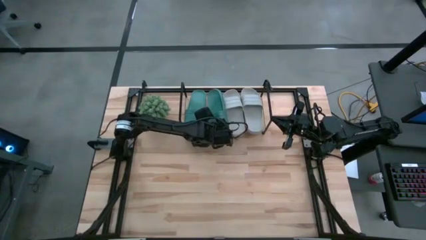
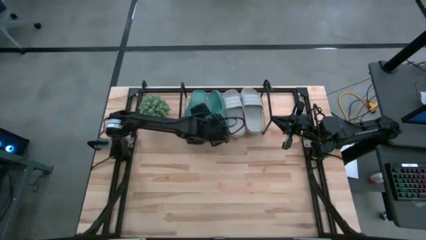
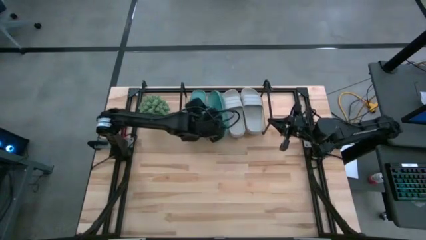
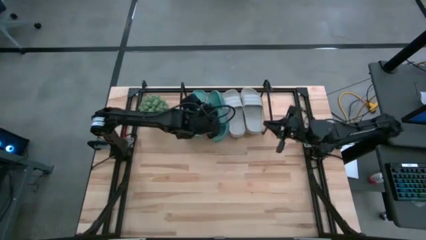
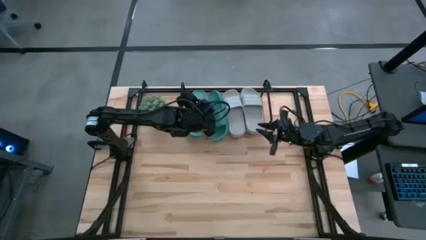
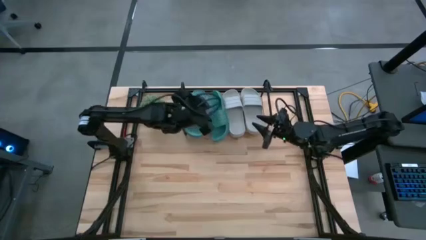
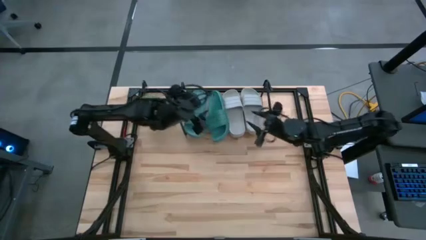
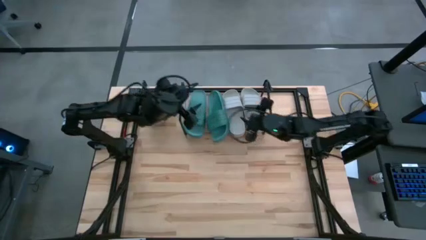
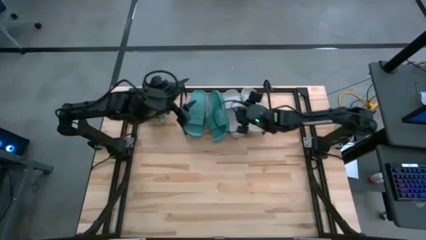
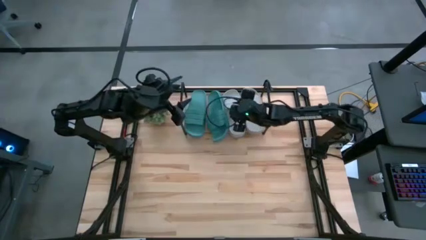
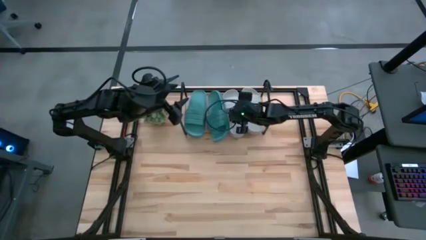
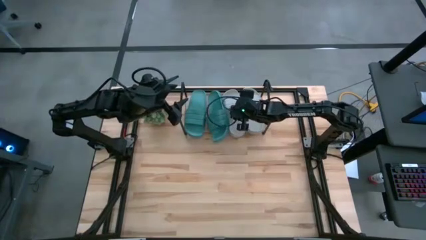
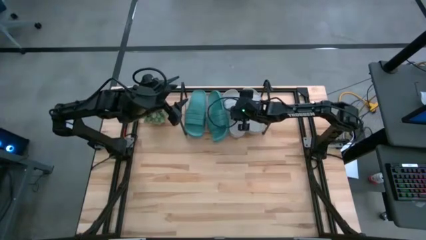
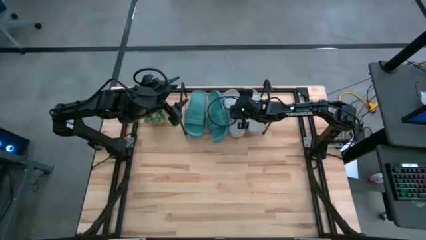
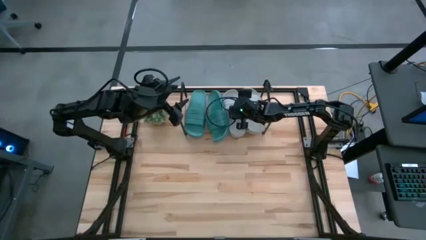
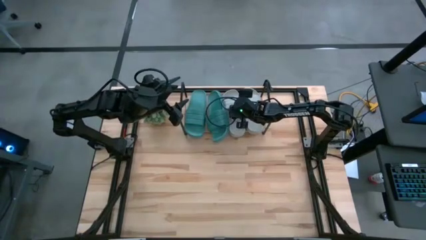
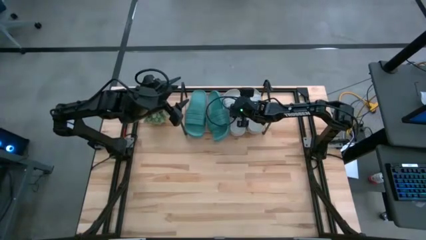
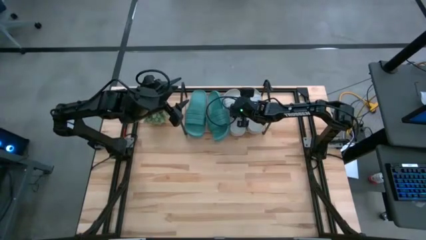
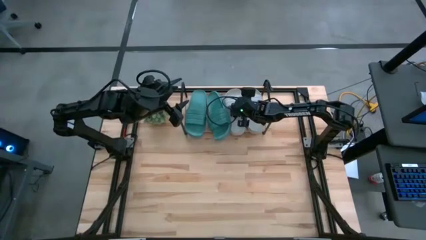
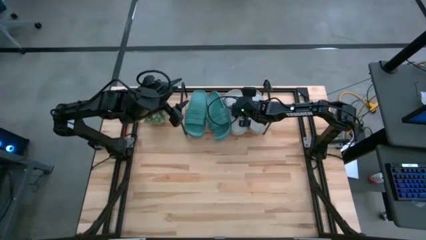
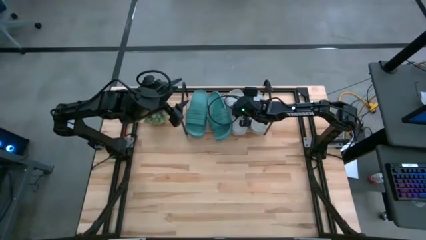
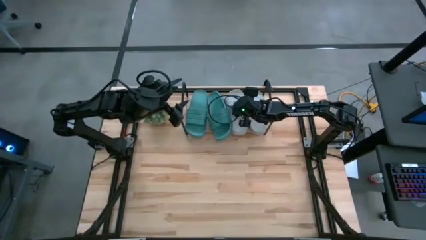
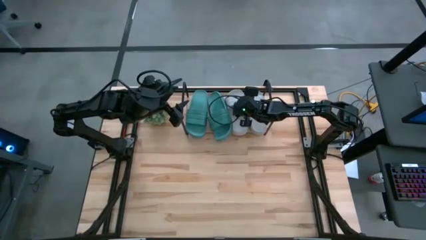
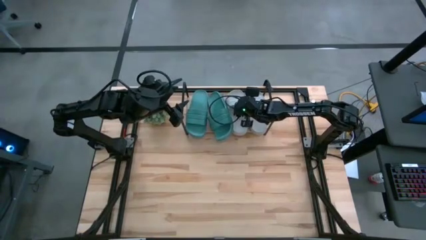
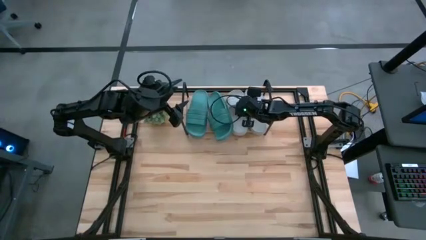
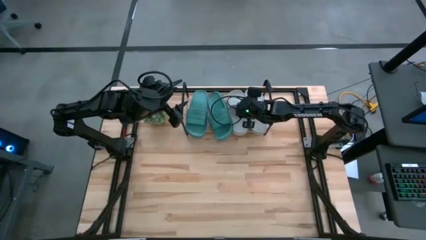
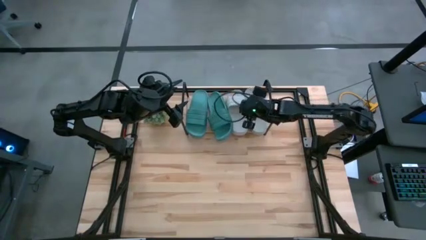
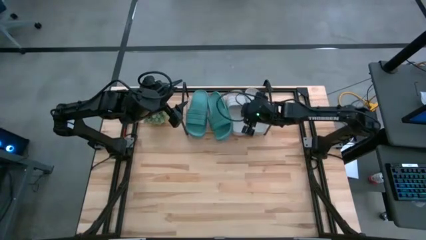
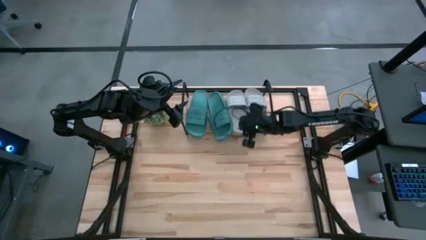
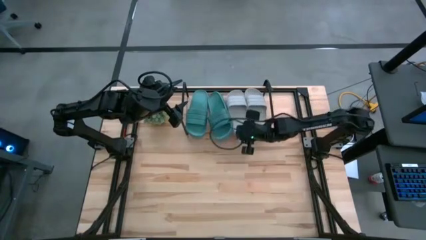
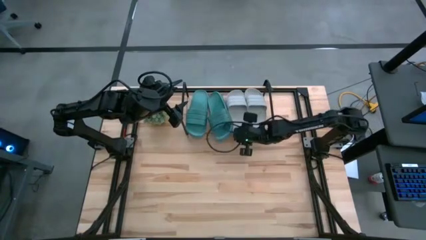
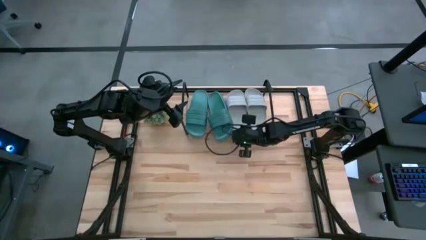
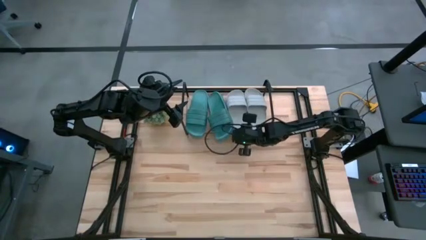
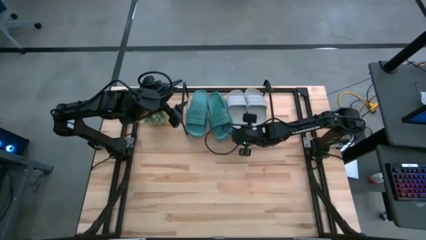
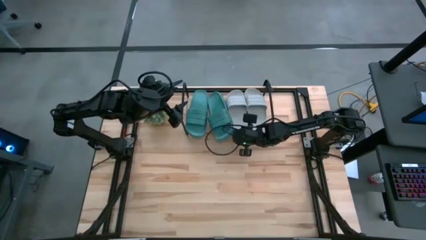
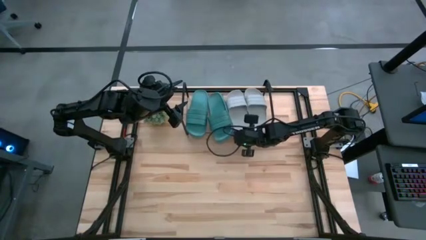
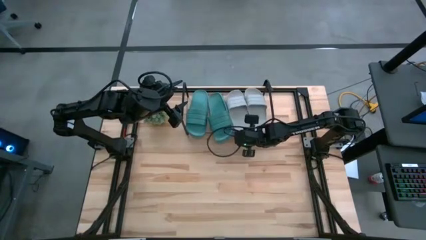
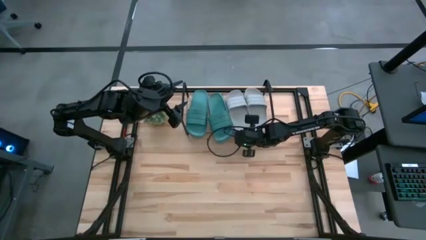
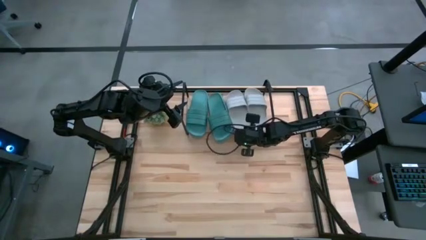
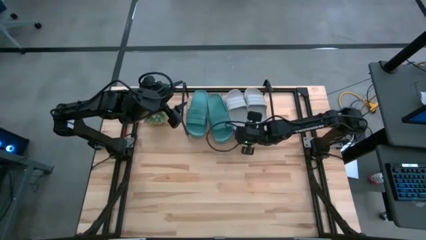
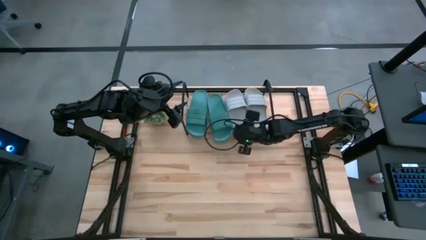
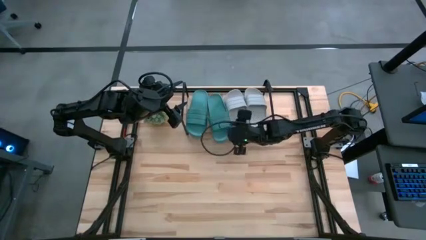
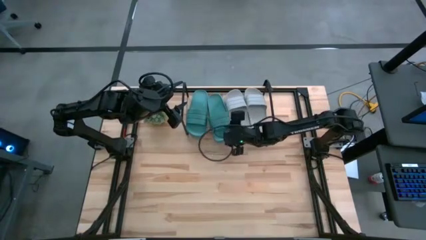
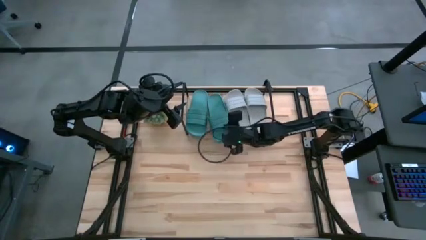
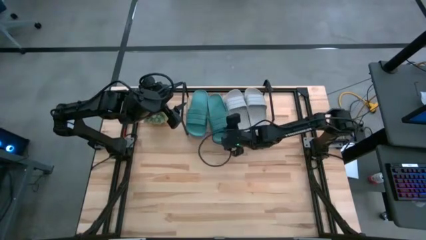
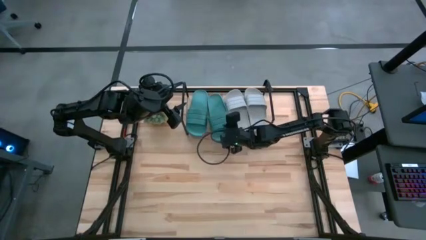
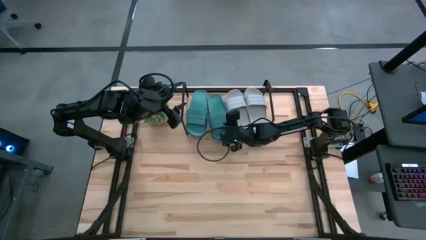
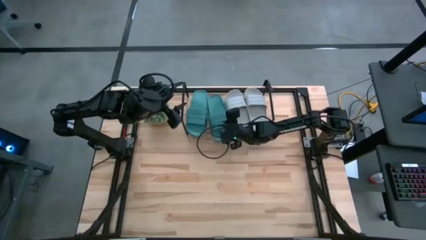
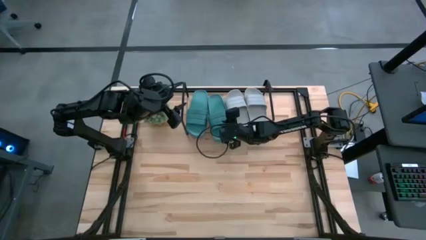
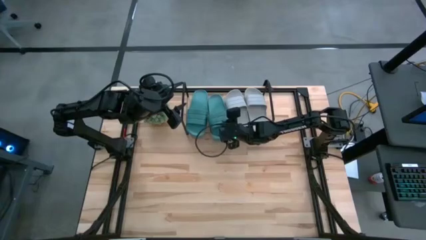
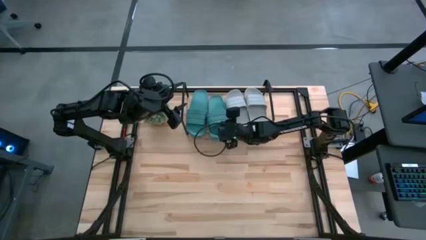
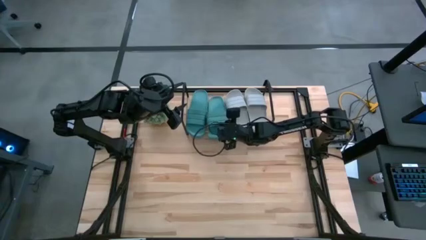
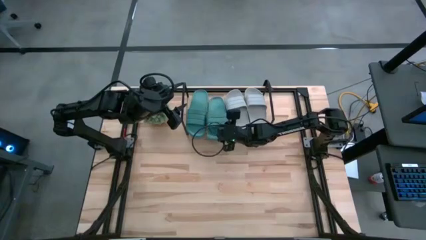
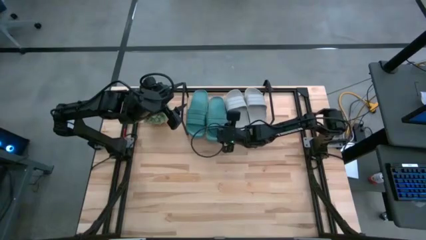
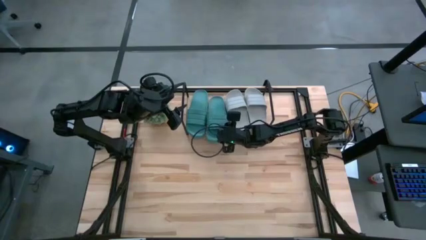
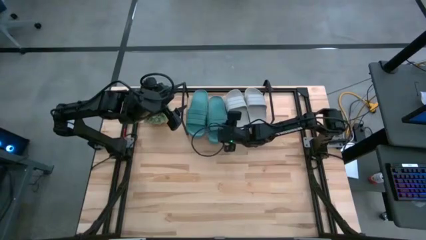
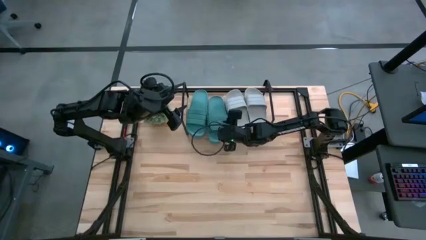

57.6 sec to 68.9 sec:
Task: Pick and place slides into the shelf
Adjust the slides on the shelf

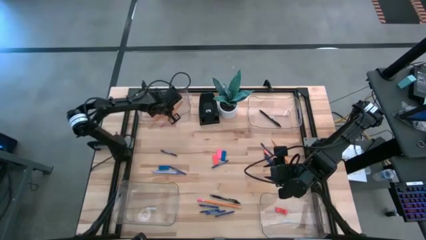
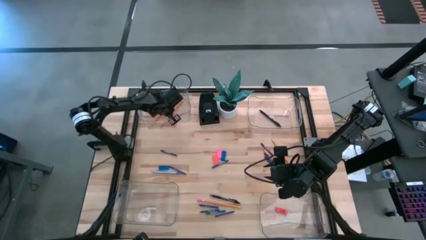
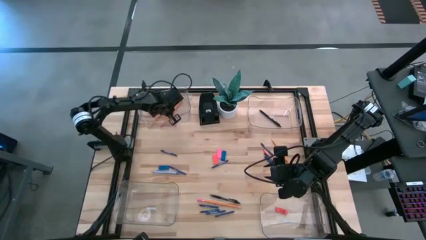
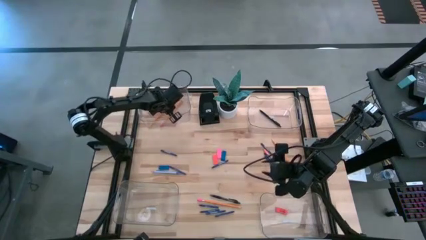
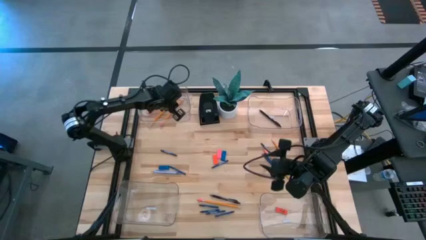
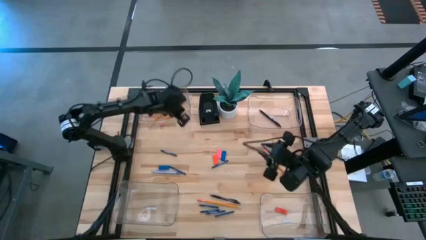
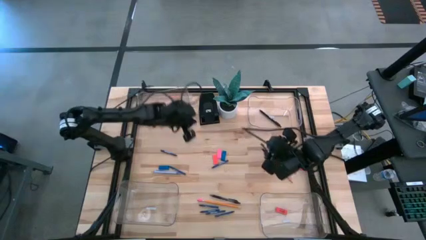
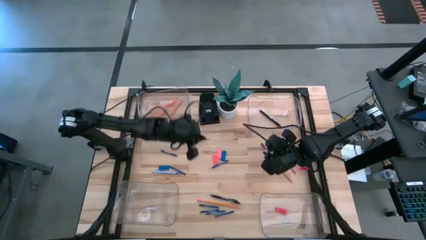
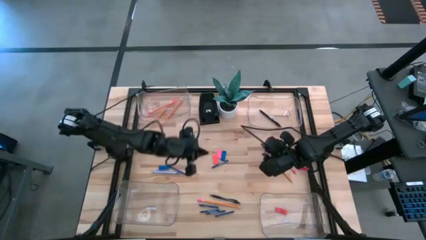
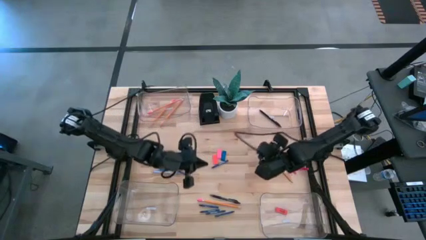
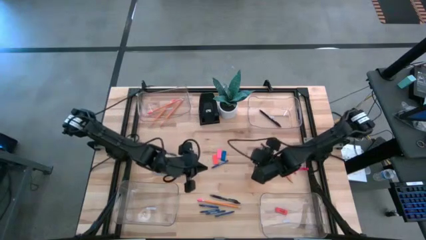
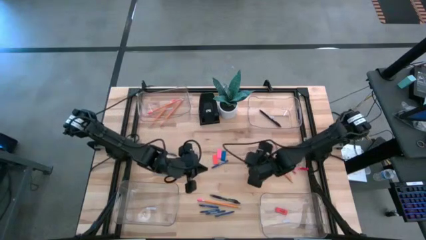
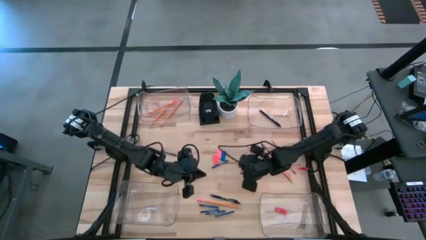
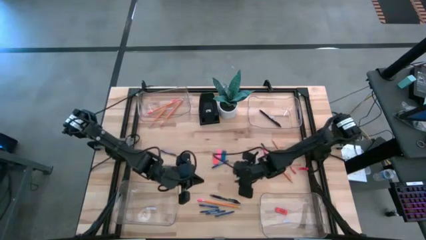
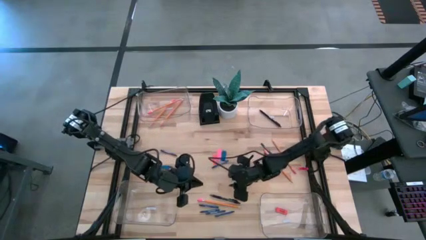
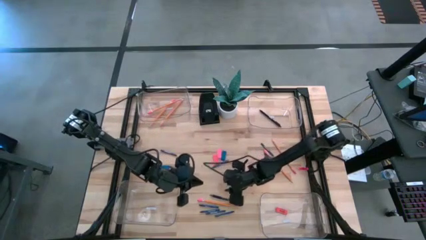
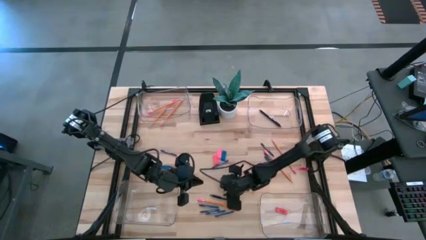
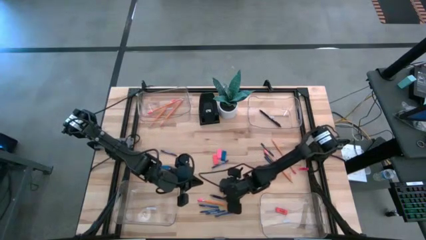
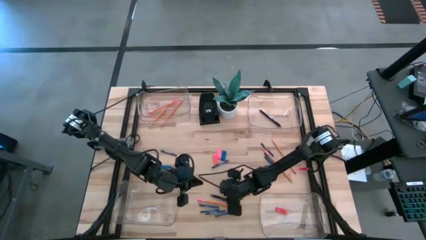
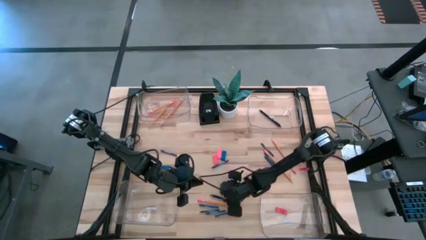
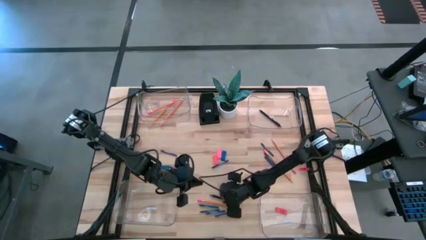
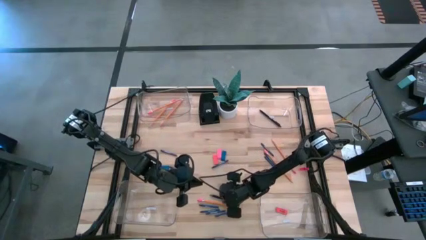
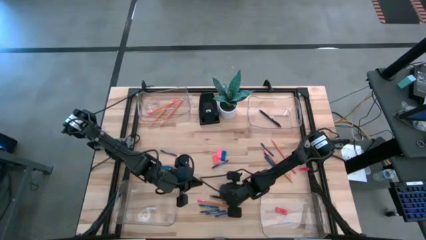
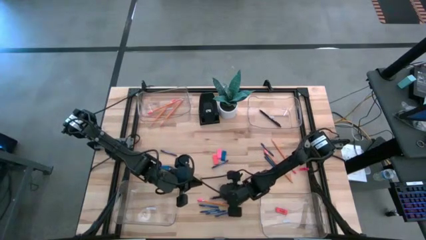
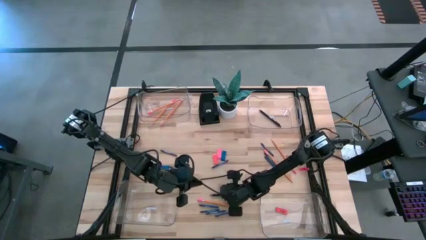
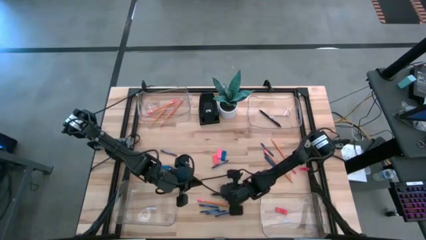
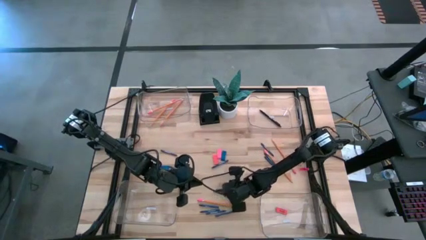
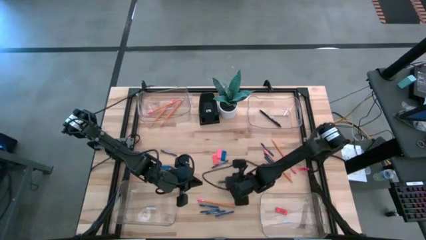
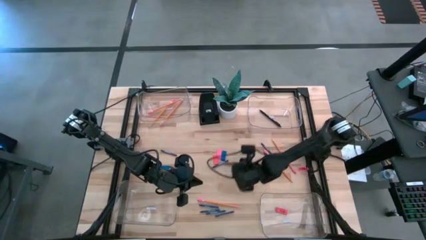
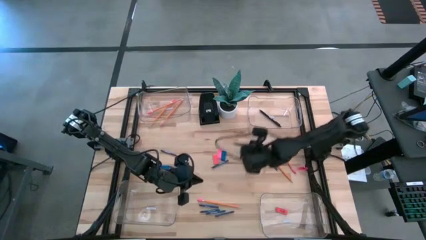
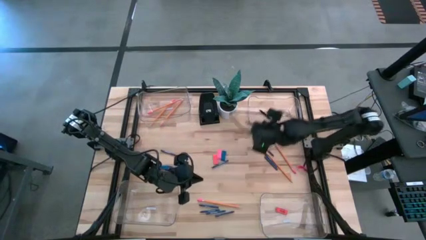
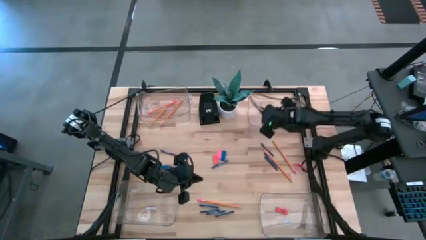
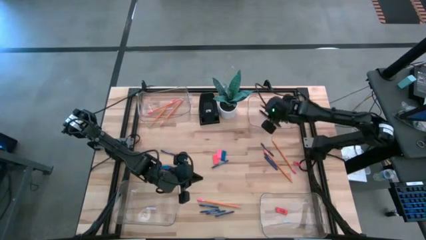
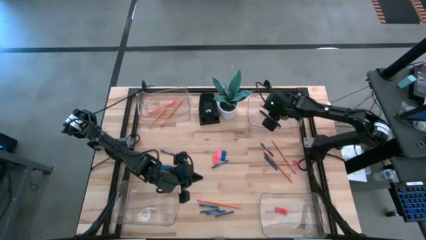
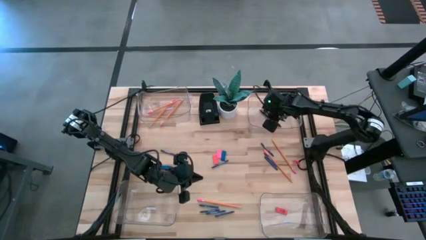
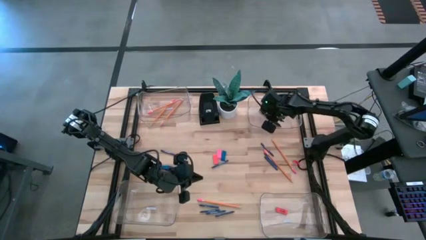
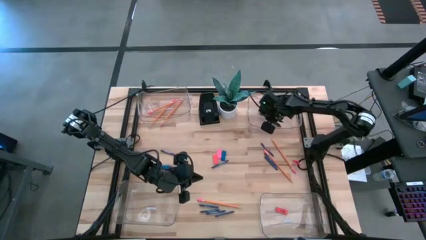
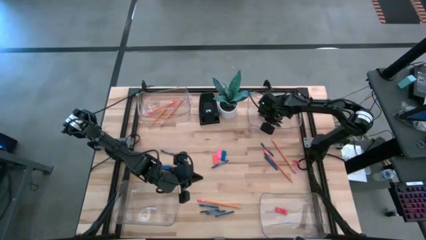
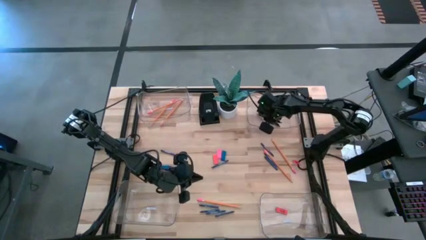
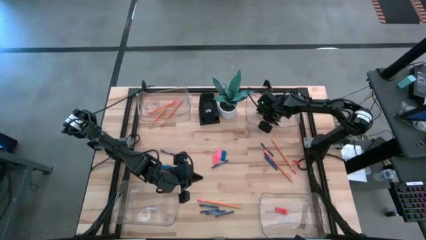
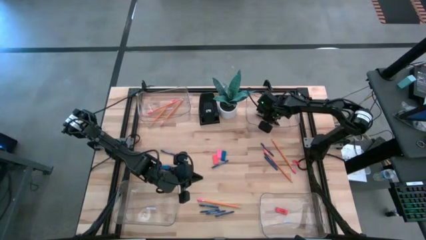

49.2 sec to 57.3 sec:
Task: Sort crayons/erasers/pens/pencils in bins
Put the black pen into the top right transparent bin
